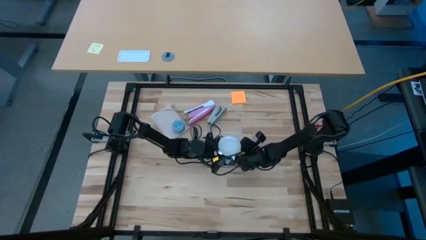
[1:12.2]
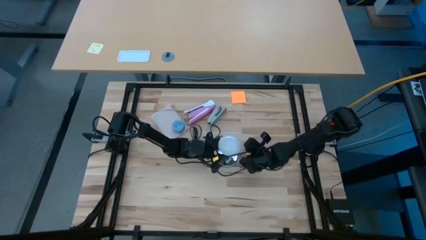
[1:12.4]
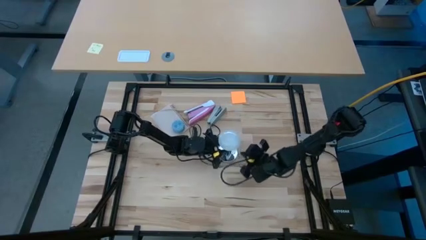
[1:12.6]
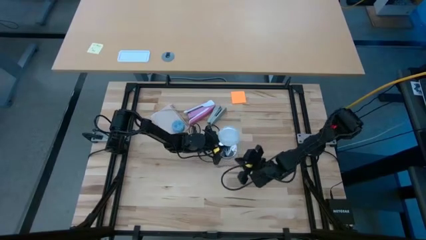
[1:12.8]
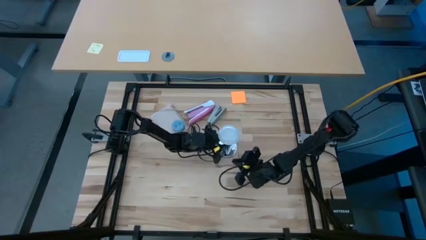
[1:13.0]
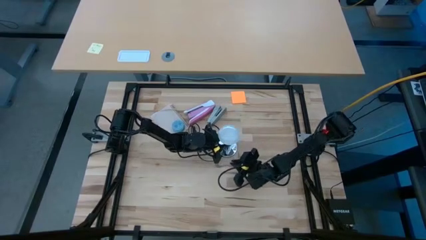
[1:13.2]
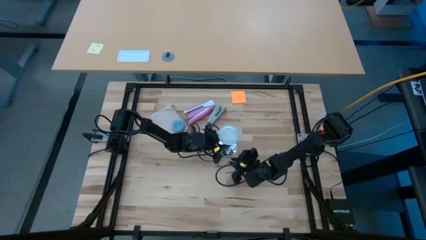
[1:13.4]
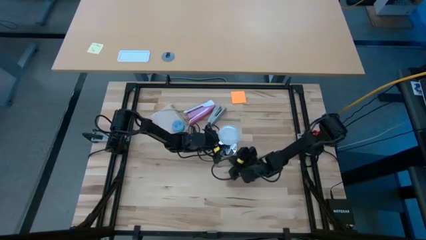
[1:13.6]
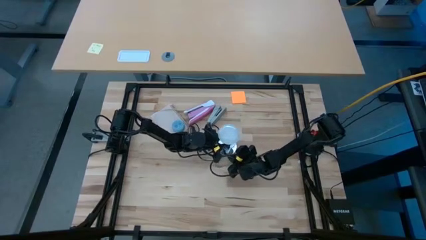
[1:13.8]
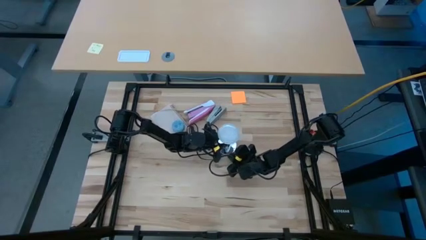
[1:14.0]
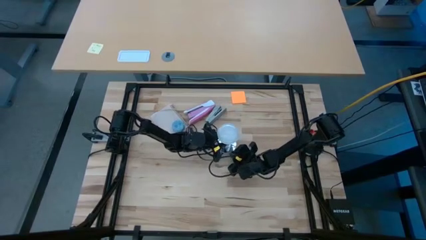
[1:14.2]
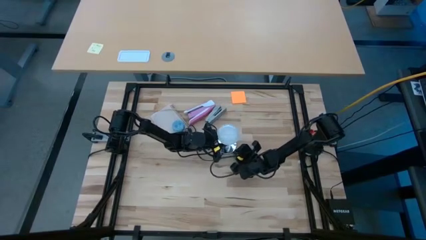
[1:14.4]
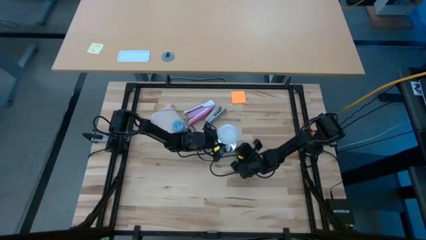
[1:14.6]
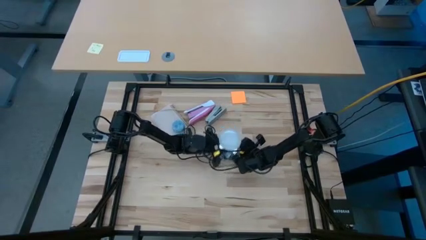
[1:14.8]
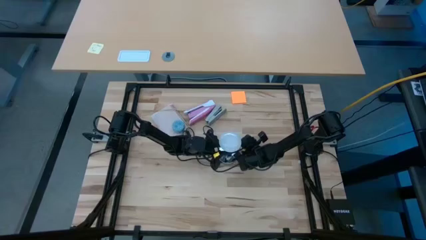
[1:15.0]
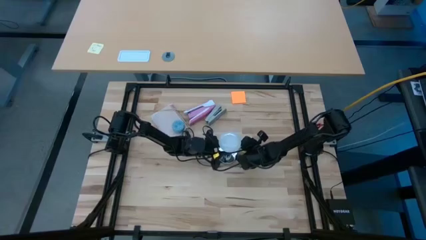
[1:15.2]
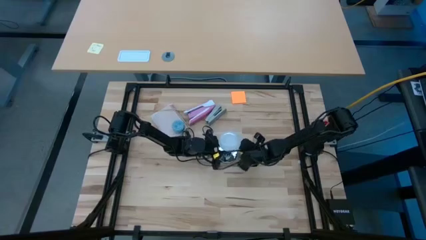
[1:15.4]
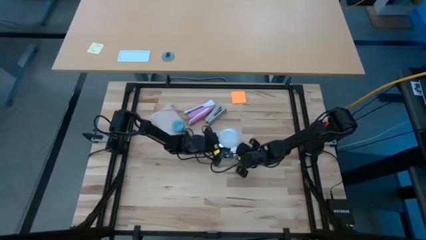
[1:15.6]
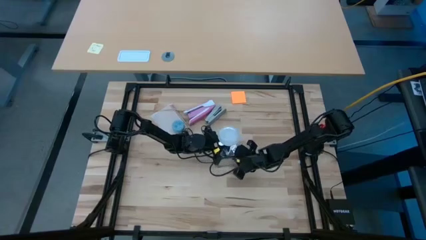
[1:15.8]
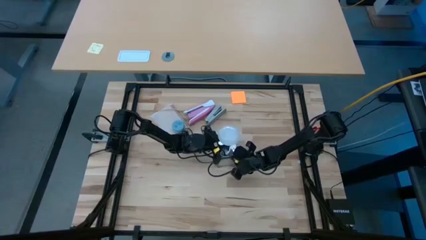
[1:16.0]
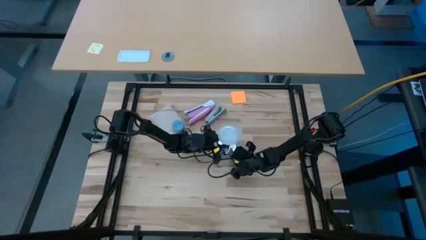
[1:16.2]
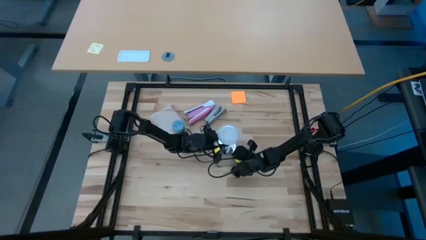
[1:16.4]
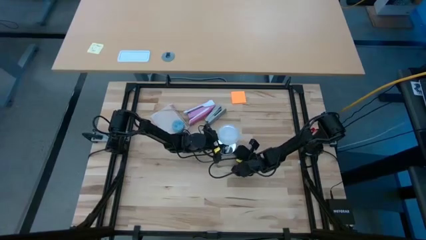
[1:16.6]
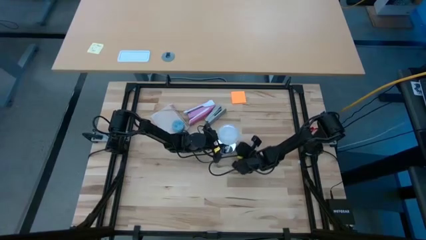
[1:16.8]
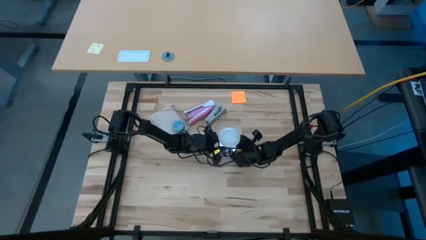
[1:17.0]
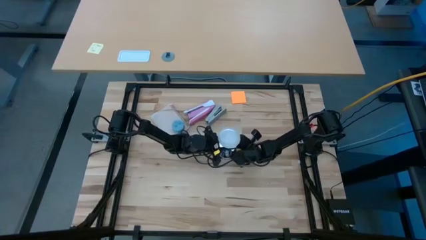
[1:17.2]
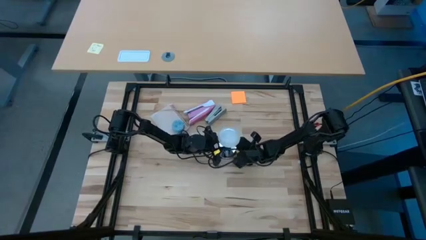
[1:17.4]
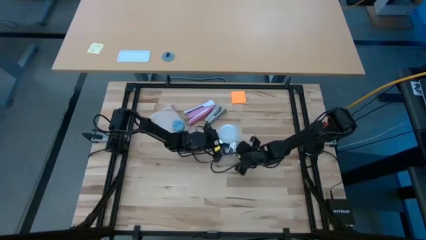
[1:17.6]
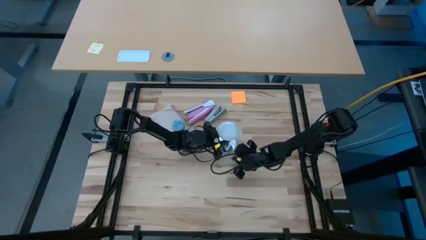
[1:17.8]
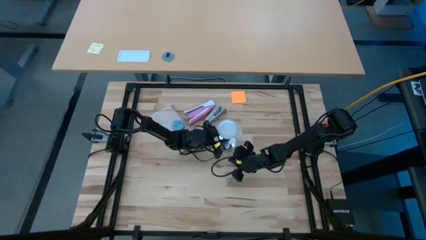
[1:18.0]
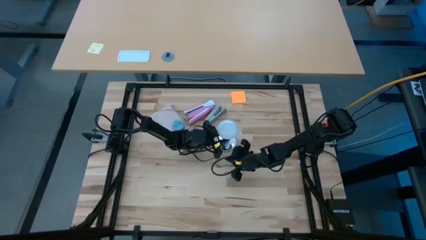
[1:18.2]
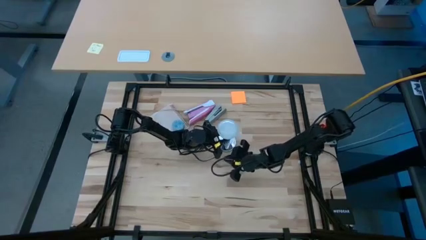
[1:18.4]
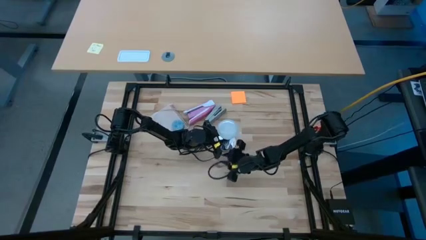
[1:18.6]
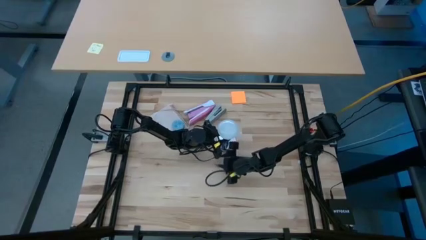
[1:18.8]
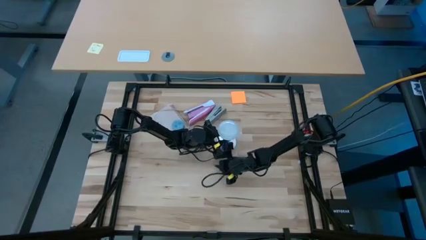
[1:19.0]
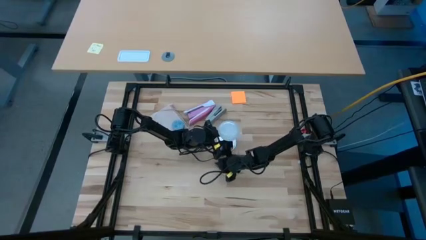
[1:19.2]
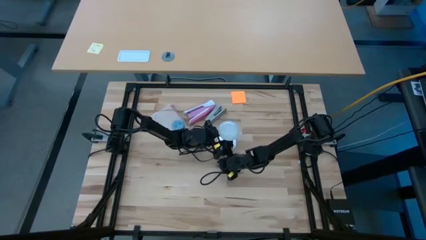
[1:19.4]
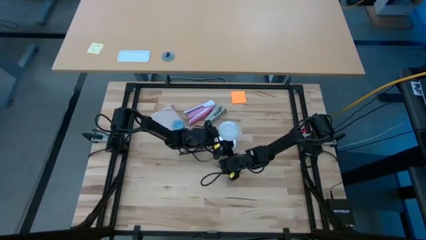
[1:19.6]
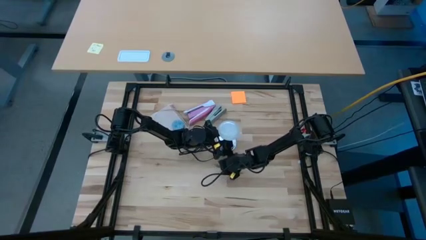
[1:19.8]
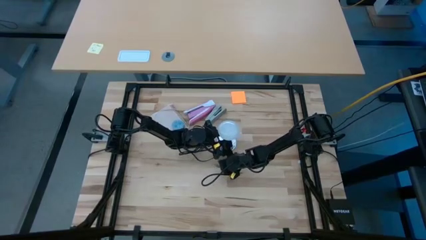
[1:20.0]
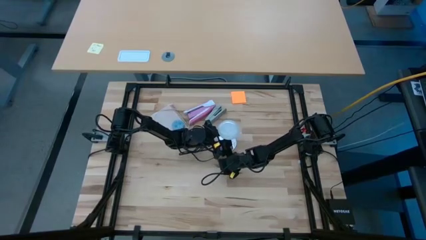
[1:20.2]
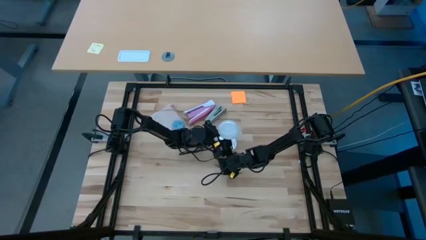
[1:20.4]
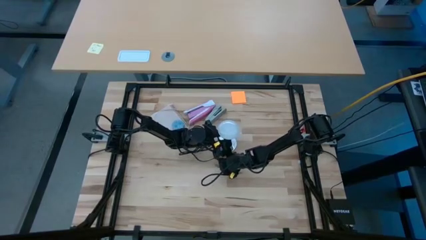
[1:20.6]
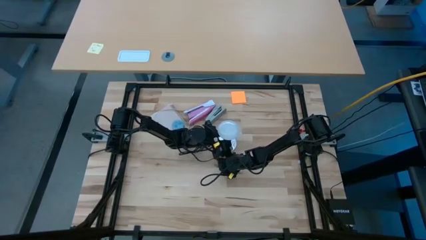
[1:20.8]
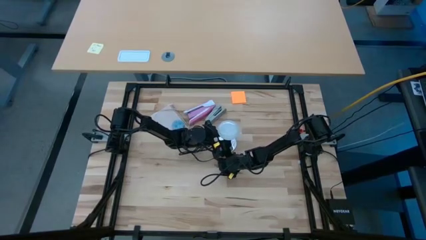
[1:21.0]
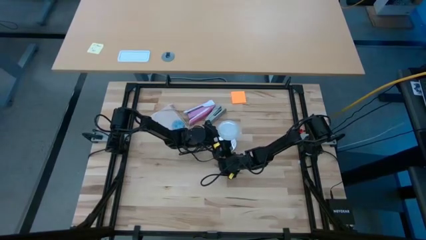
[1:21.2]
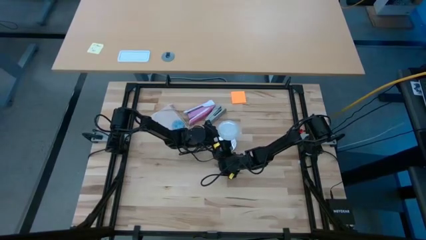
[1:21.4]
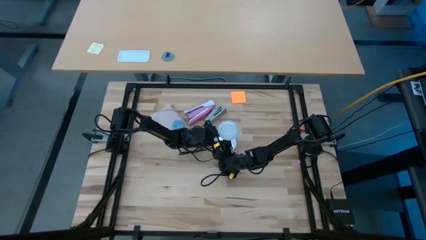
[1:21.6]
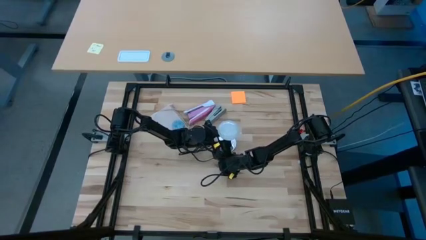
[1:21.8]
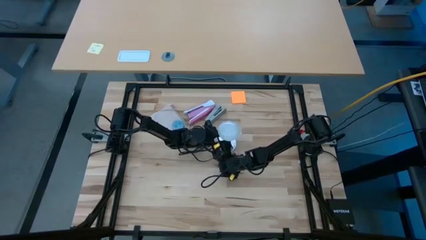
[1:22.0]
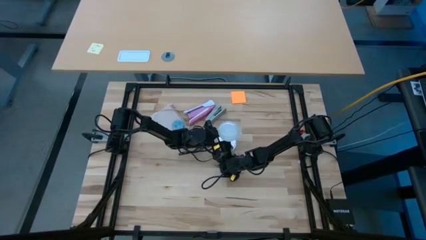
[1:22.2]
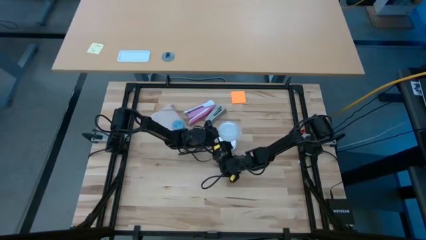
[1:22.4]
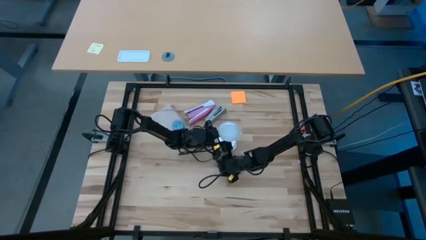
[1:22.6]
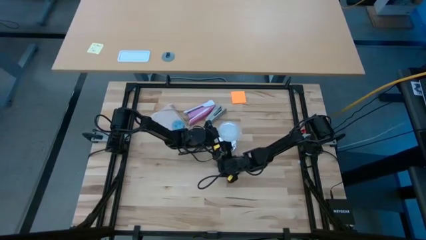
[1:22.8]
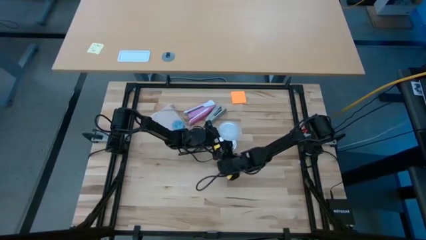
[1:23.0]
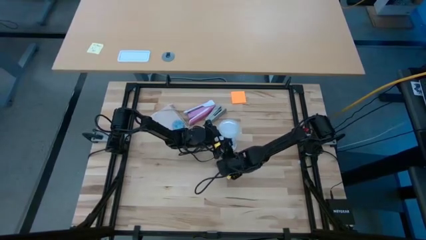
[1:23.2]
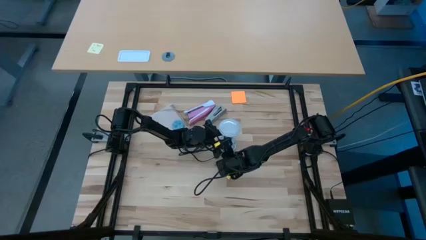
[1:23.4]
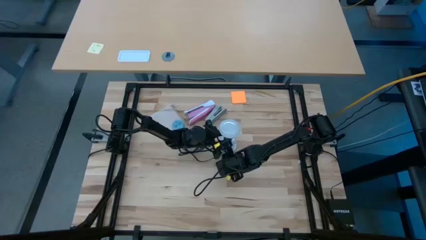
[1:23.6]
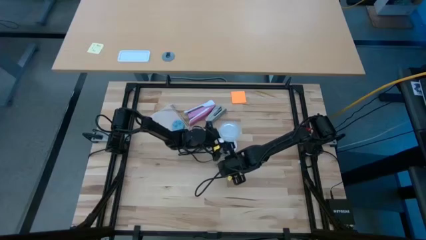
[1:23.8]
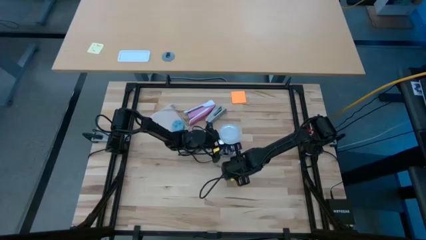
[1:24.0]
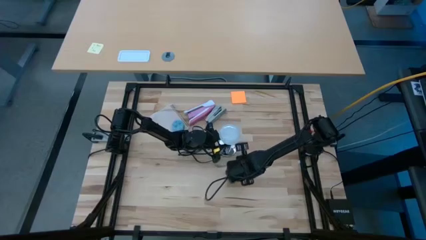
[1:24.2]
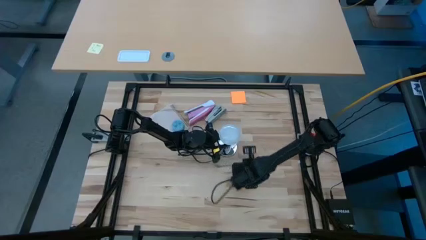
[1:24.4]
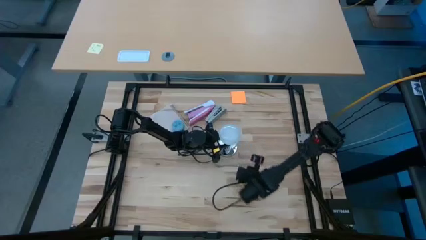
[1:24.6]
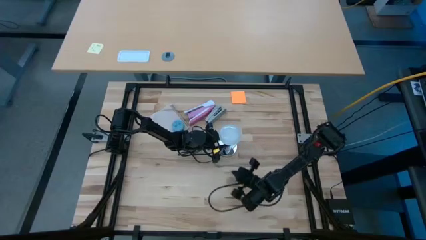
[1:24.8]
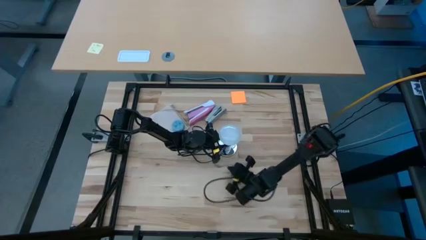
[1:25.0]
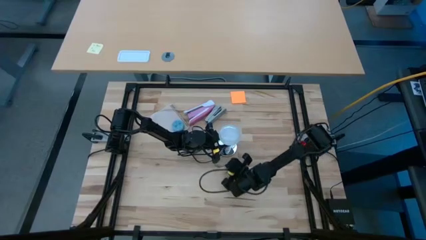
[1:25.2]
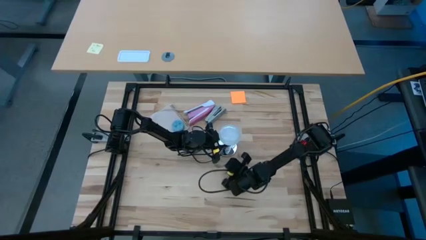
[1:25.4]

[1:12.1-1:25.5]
Task: Screw lightbulb
Insert the white lightbulb into the silver desk lamp

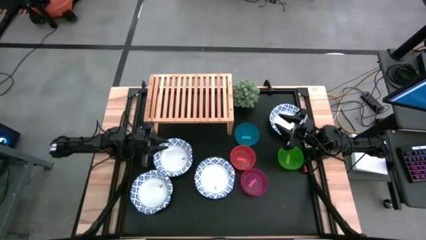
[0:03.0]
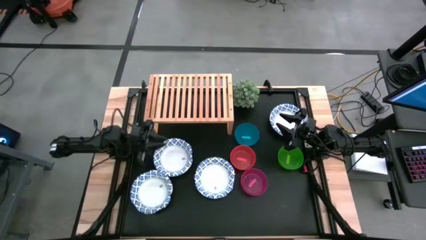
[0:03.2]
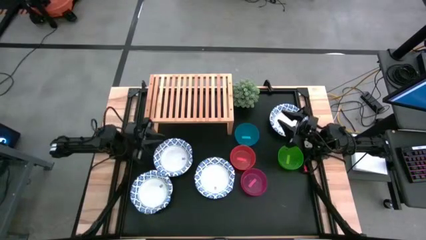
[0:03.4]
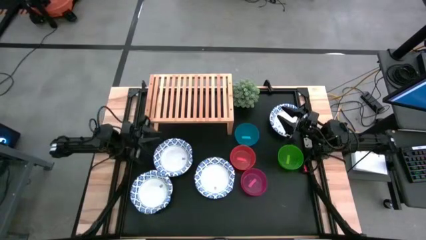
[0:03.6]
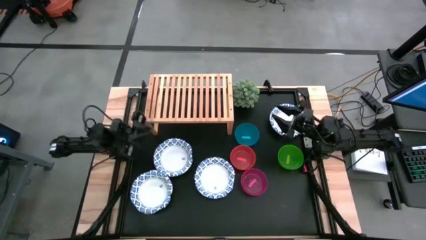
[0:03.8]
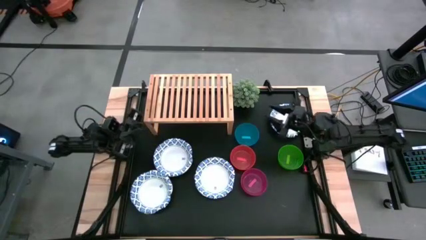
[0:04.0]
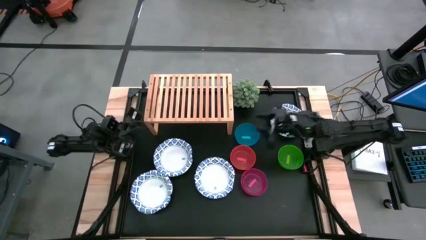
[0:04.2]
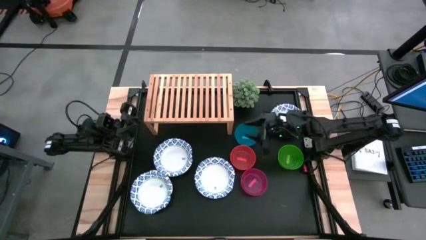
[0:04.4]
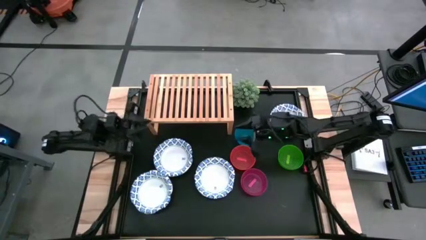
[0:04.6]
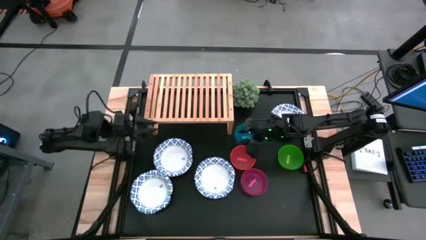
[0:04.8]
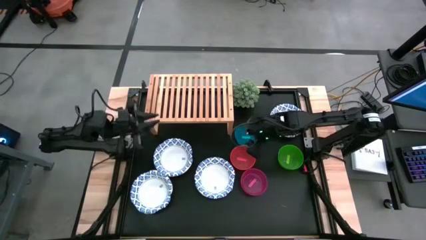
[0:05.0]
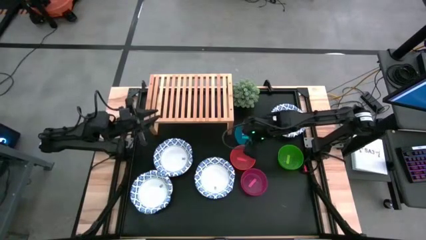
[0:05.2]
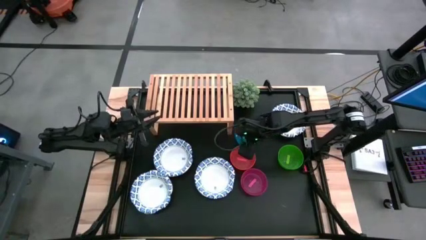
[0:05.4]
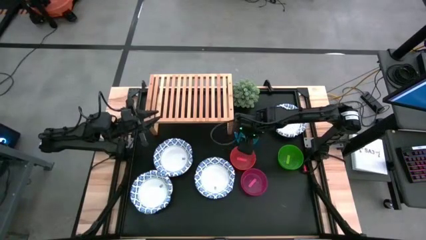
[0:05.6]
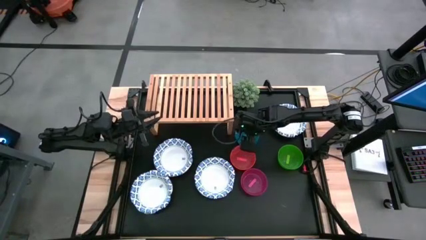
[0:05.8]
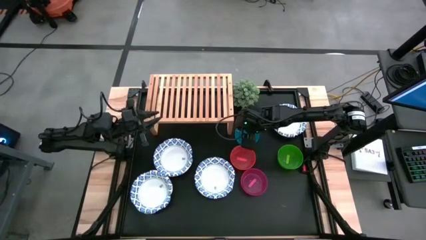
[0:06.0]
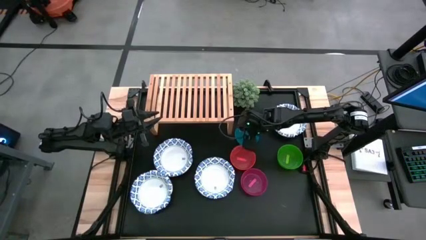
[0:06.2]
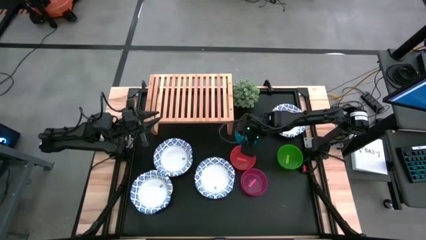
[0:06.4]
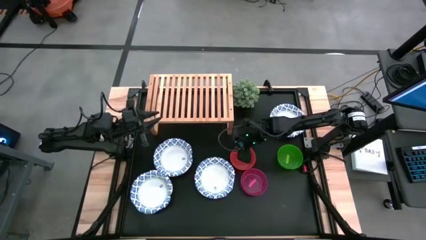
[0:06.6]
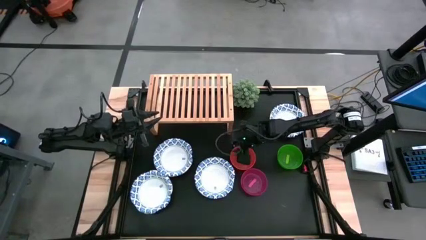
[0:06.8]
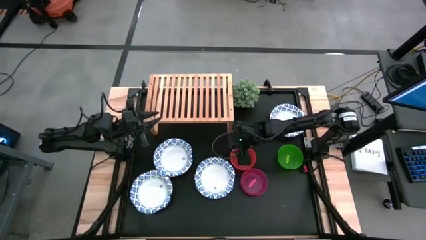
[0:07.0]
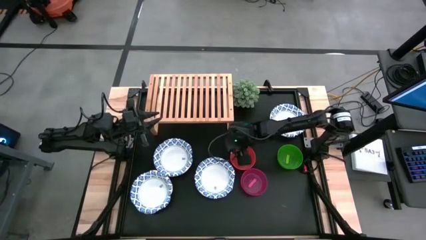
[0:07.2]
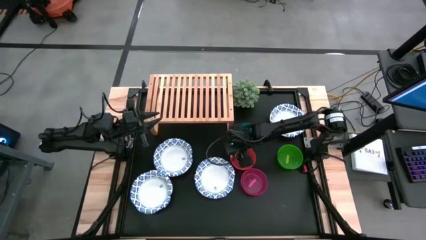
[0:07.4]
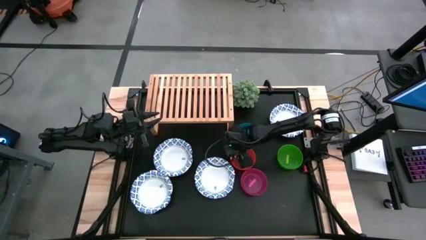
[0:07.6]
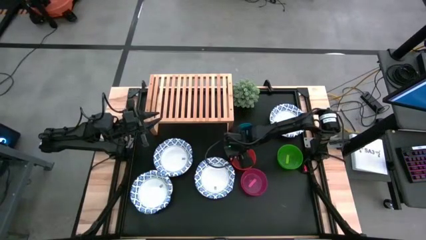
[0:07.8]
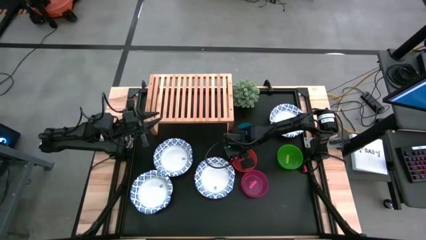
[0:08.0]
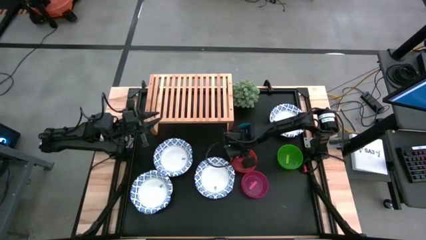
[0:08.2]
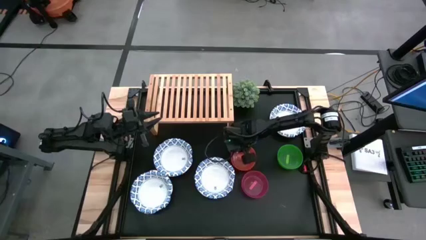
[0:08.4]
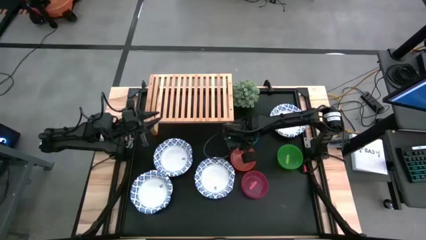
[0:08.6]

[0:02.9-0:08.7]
Task: Place and stack bowls onto a shelf
Put the orange bowl on the shelf
